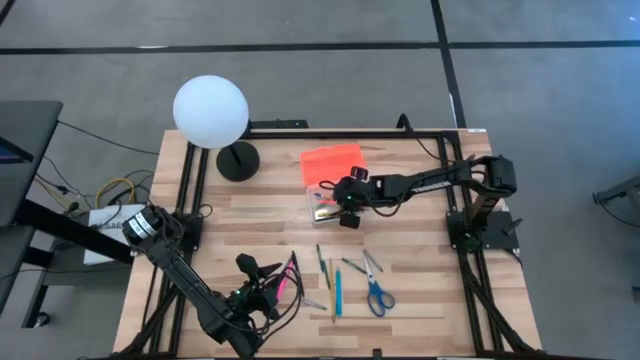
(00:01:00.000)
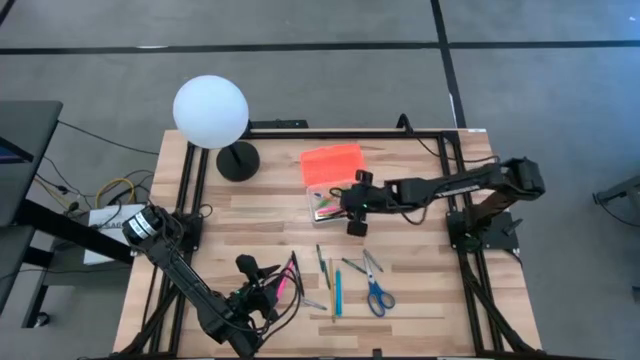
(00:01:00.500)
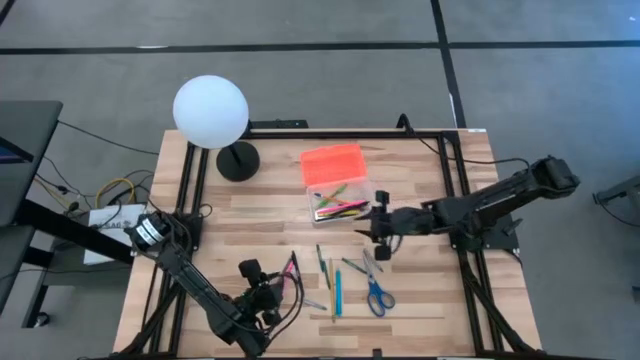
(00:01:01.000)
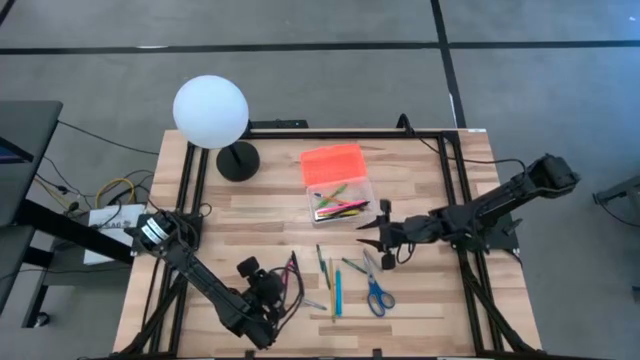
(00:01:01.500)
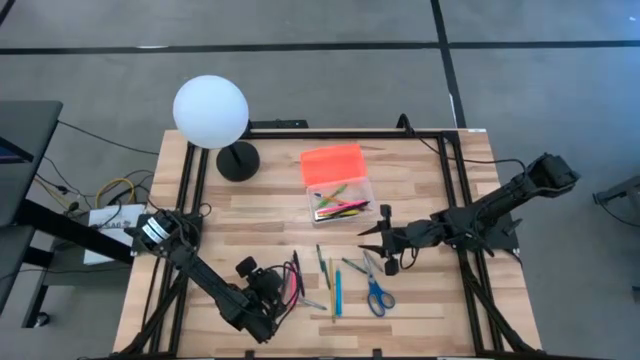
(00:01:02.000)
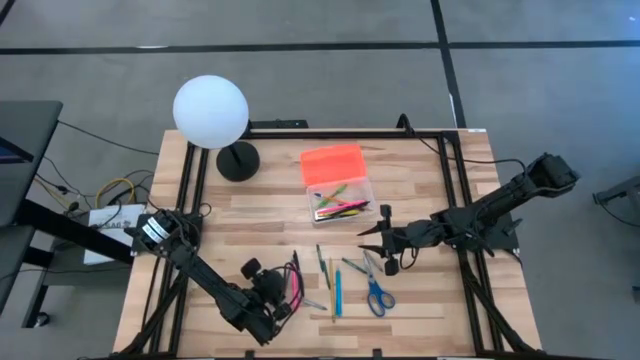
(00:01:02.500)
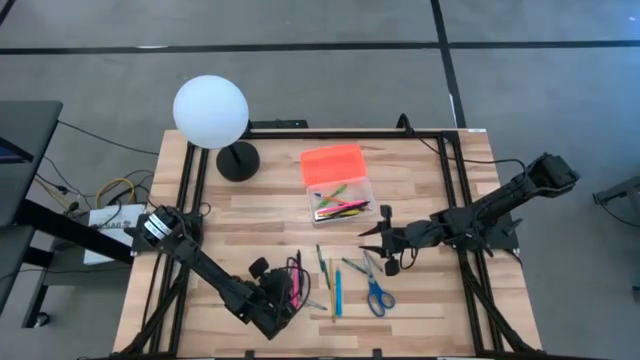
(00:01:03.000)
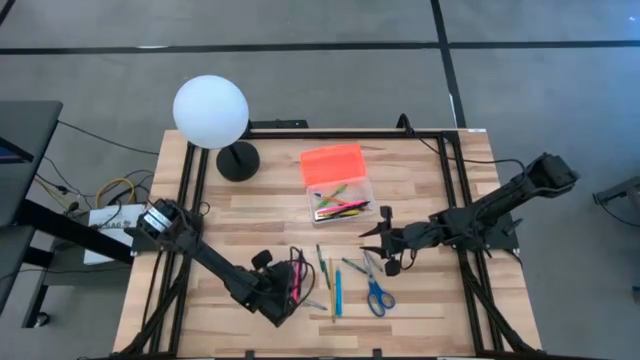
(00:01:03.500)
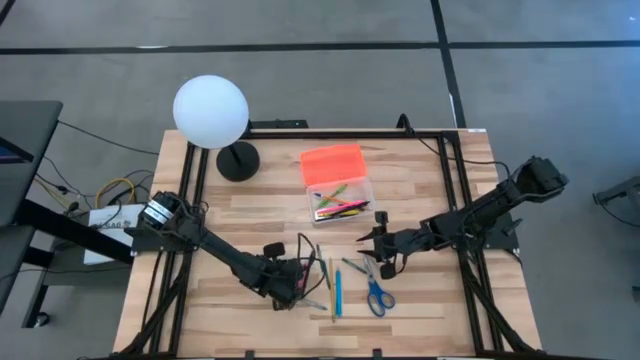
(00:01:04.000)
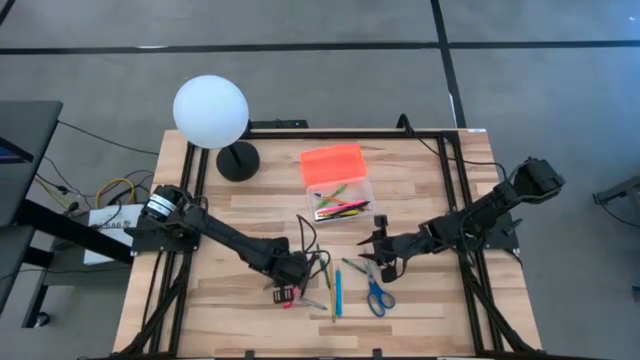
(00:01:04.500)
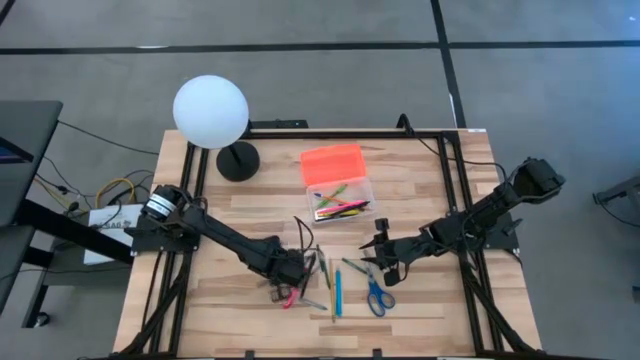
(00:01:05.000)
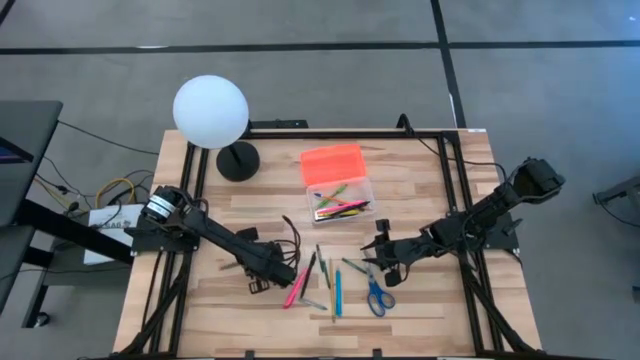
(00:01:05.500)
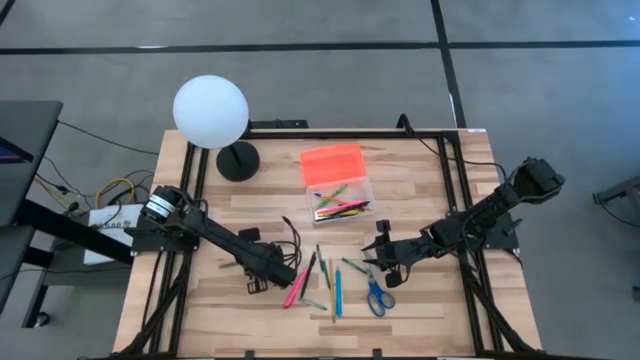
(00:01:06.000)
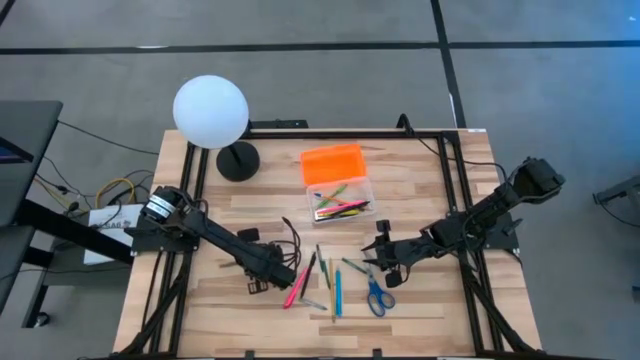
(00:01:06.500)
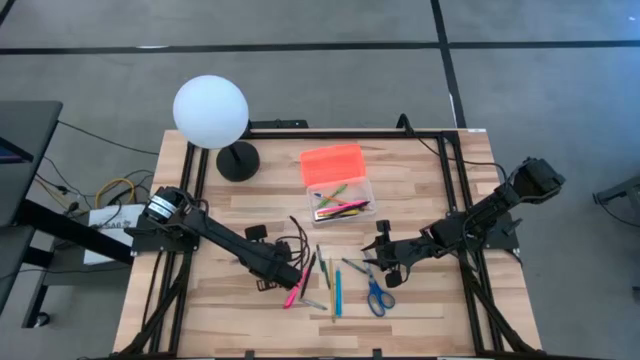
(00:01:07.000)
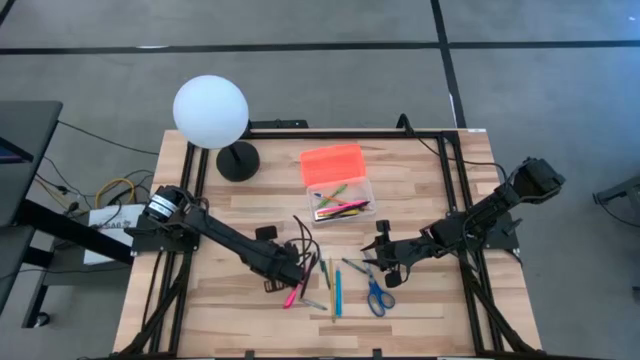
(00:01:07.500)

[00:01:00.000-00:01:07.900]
Task: Pick & place school supplies into a supply box
Put the gray pen into the orange supply box

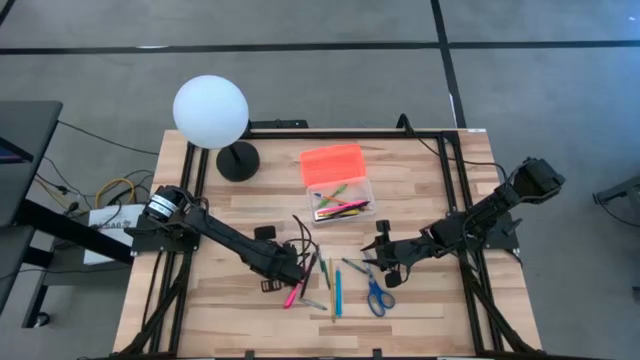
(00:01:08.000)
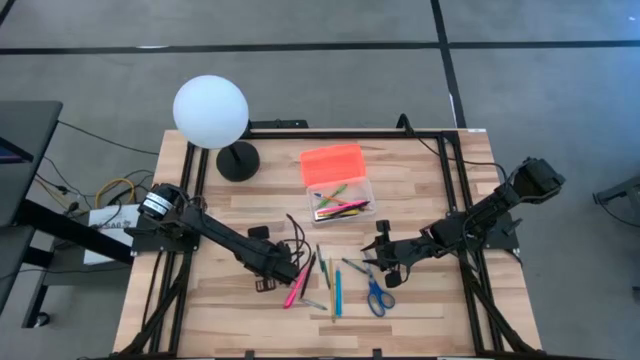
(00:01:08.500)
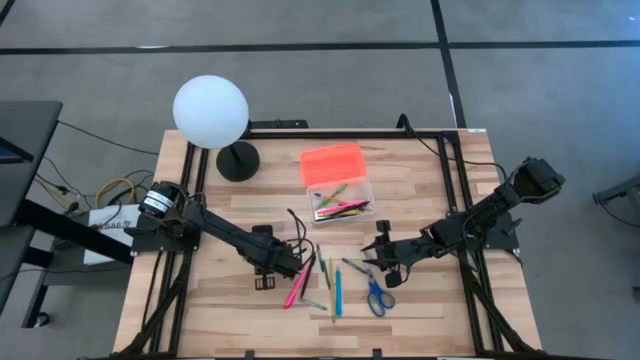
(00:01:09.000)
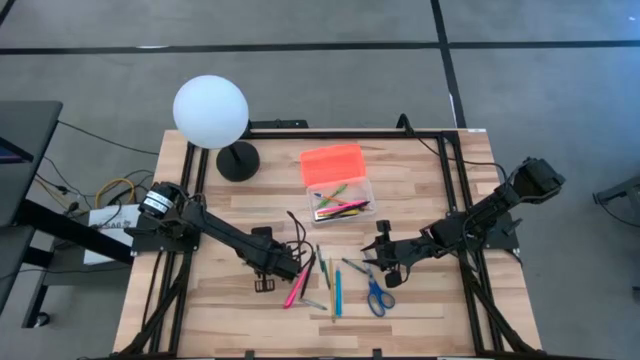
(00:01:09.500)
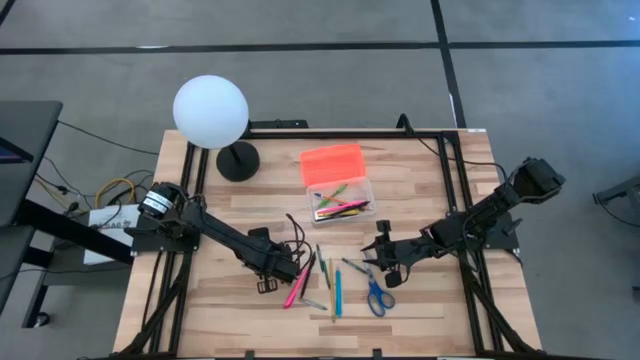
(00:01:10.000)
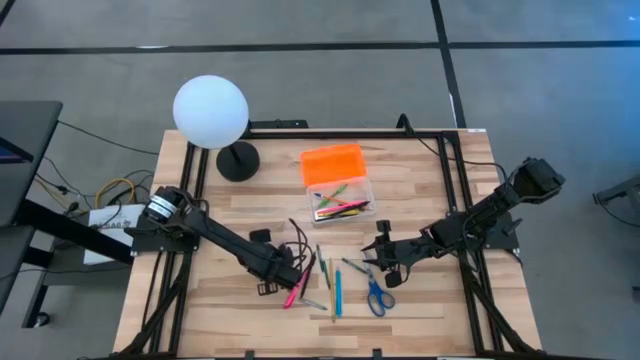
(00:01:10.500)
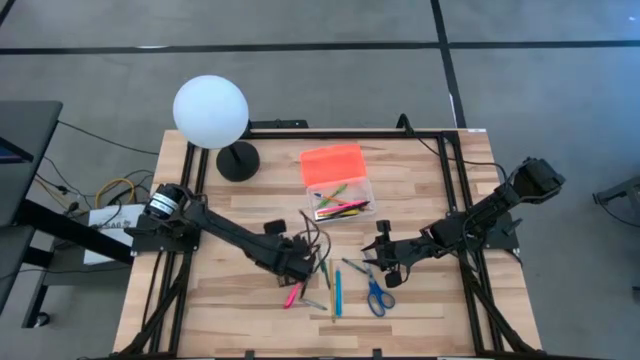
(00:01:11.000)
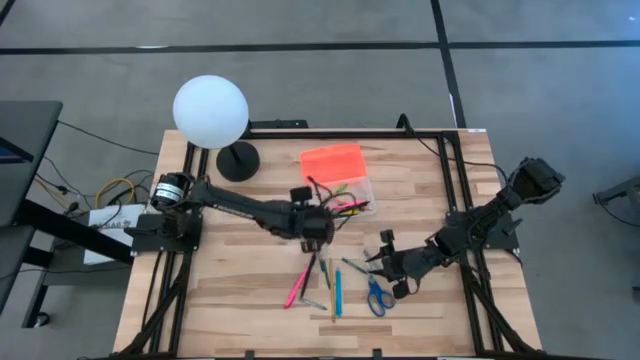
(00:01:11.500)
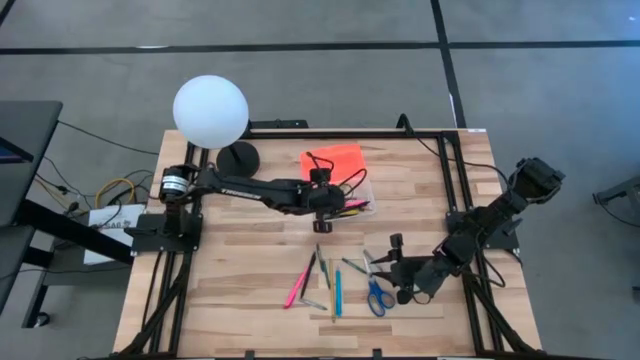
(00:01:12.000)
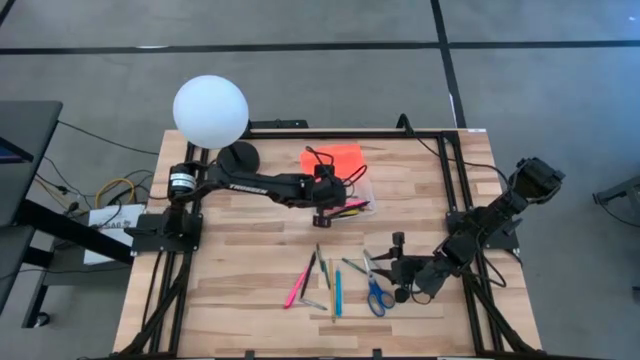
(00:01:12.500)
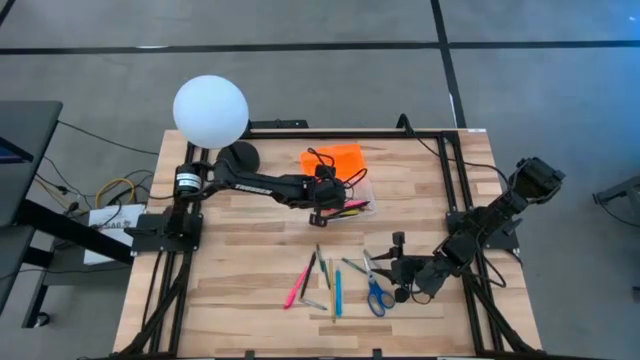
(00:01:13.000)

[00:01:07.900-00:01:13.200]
Put the gray pen into the orange supply box

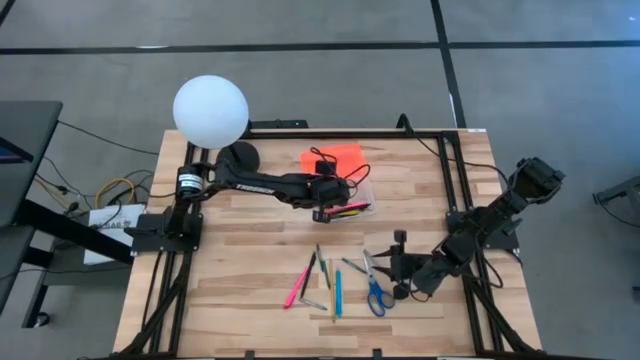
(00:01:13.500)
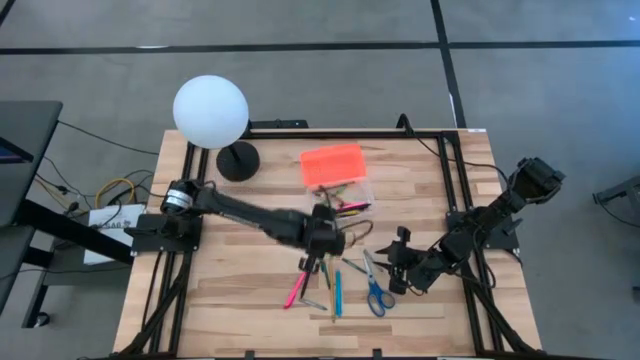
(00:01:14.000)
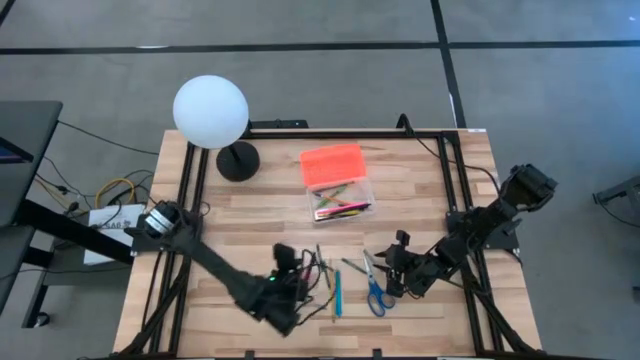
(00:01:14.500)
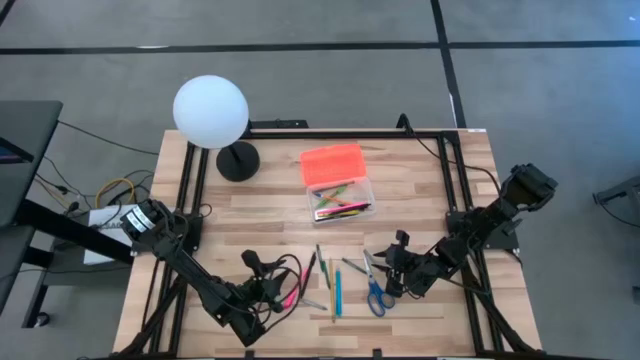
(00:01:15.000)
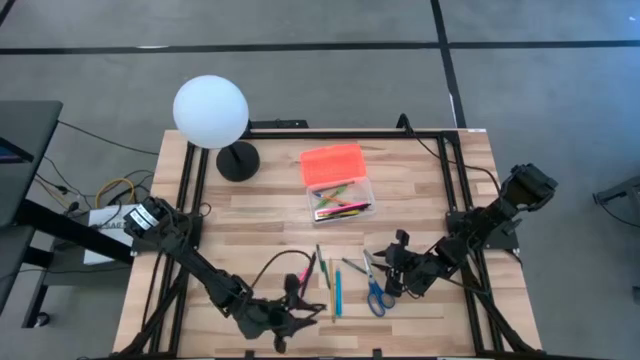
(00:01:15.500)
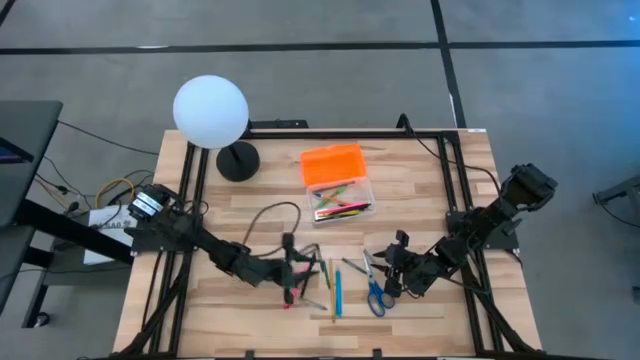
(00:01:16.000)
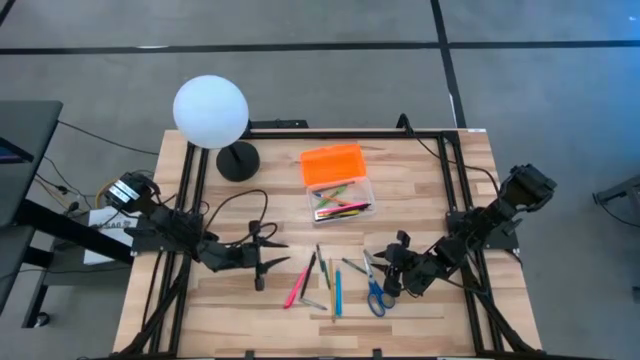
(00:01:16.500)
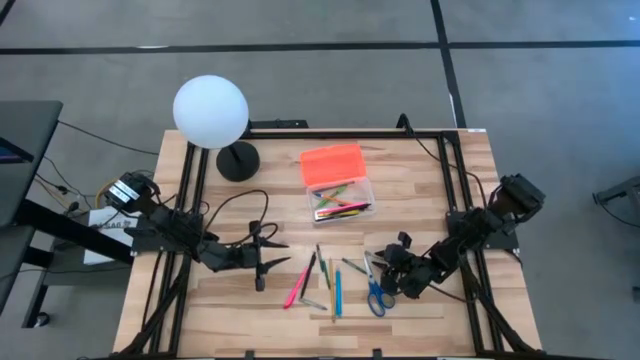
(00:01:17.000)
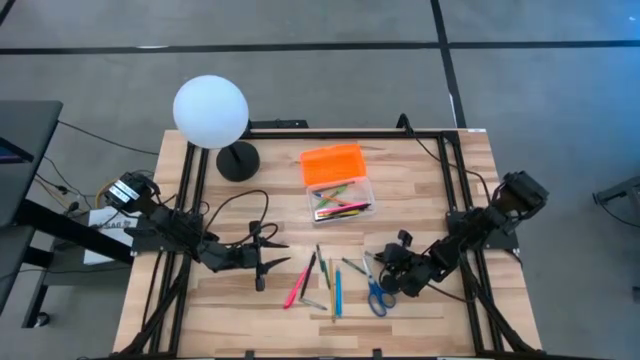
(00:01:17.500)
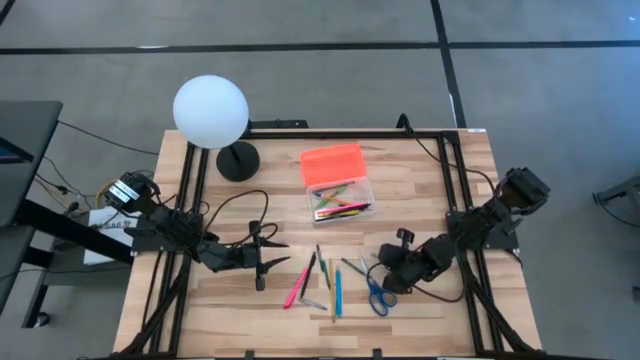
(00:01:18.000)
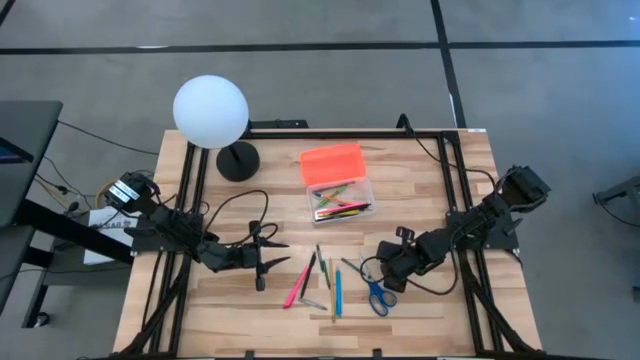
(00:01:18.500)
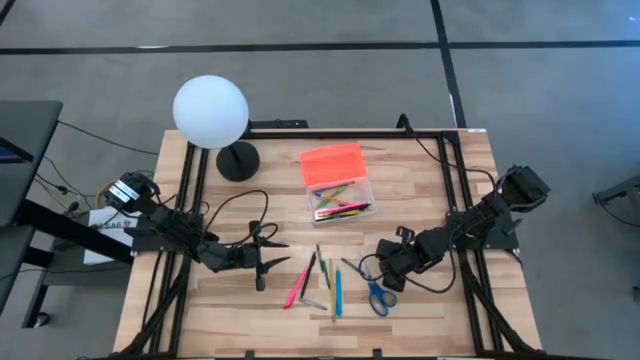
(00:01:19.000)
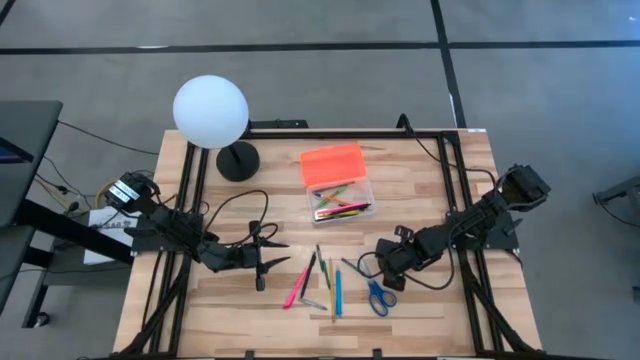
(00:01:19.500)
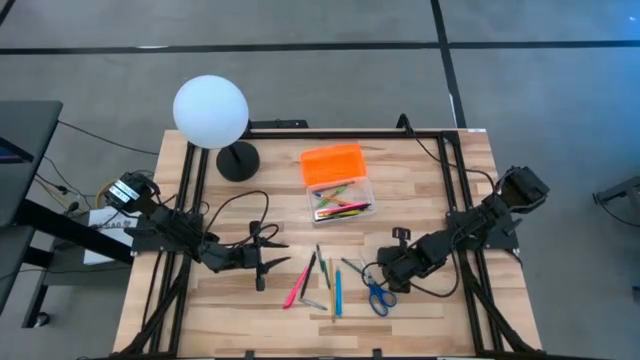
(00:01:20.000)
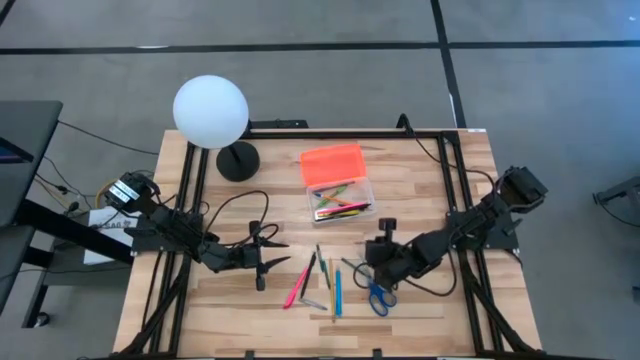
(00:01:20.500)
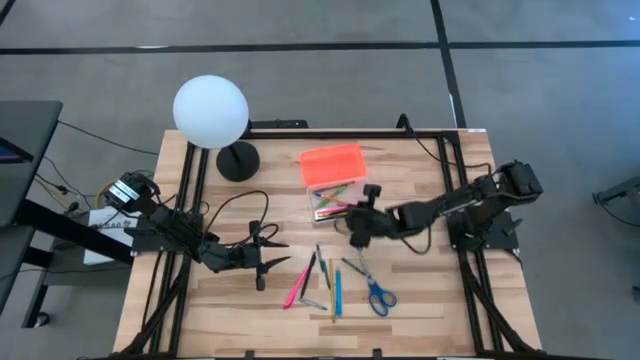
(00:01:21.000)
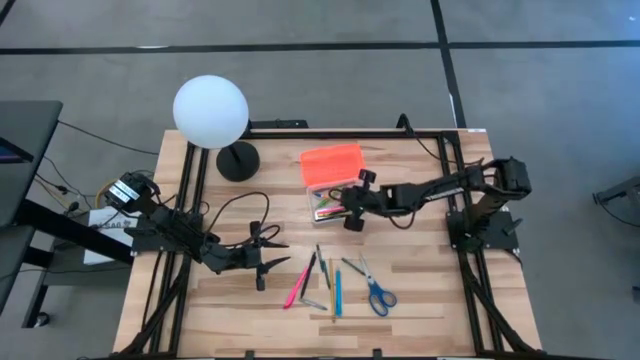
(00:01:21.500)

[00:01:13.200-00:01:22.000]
Put the gray crayon into the orange supply box
